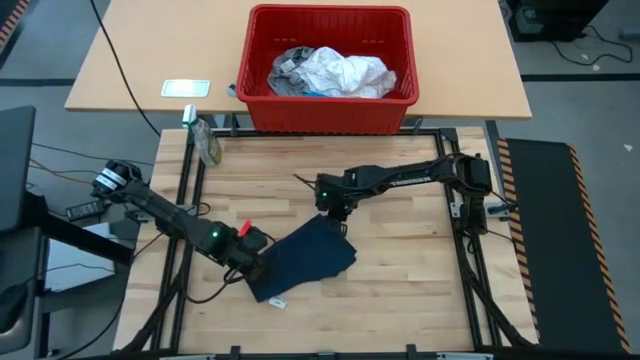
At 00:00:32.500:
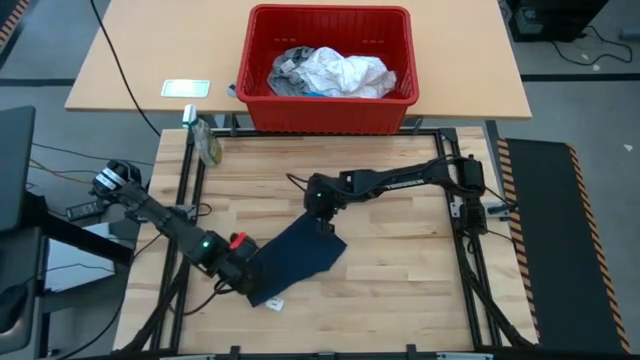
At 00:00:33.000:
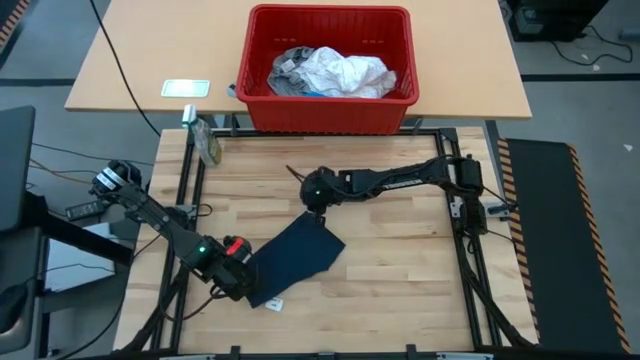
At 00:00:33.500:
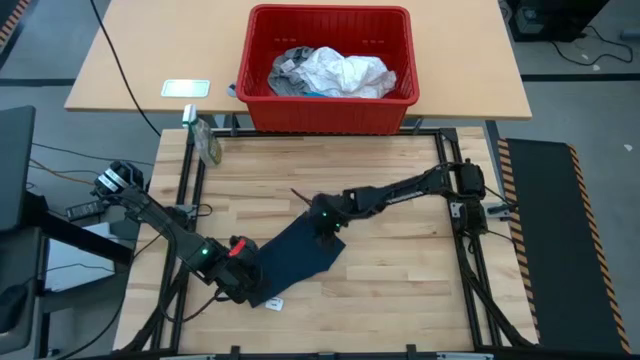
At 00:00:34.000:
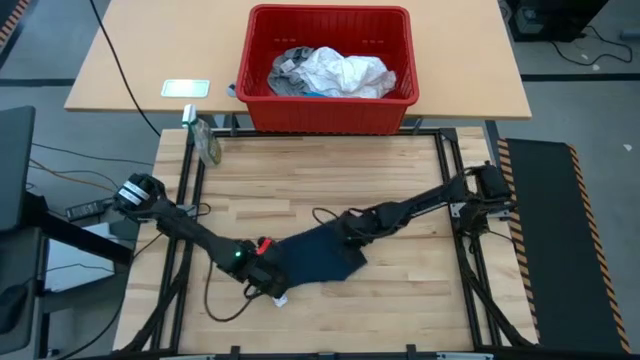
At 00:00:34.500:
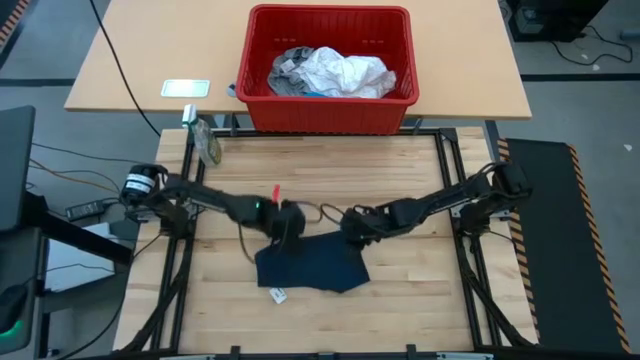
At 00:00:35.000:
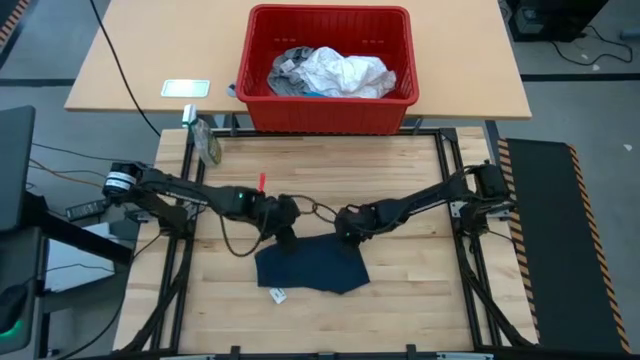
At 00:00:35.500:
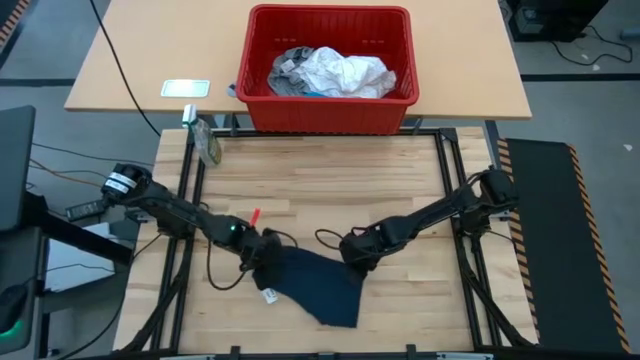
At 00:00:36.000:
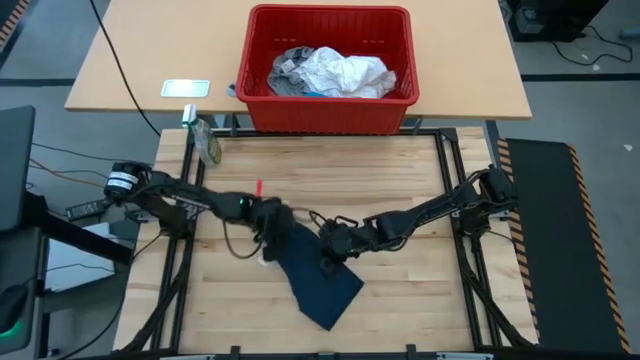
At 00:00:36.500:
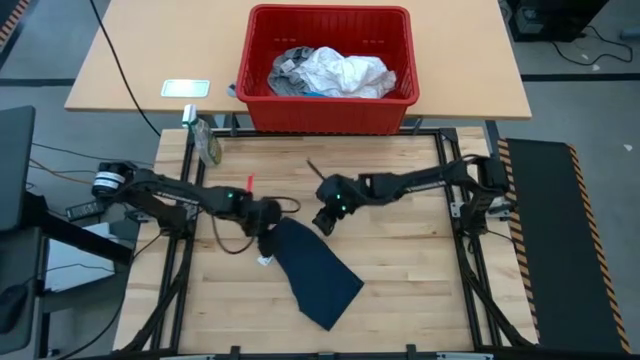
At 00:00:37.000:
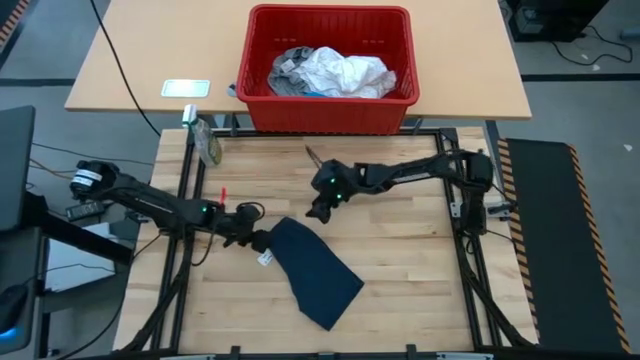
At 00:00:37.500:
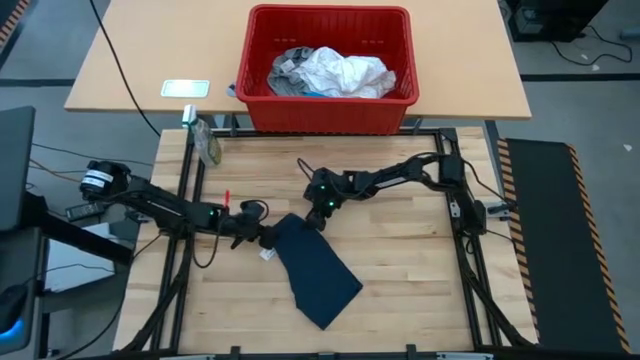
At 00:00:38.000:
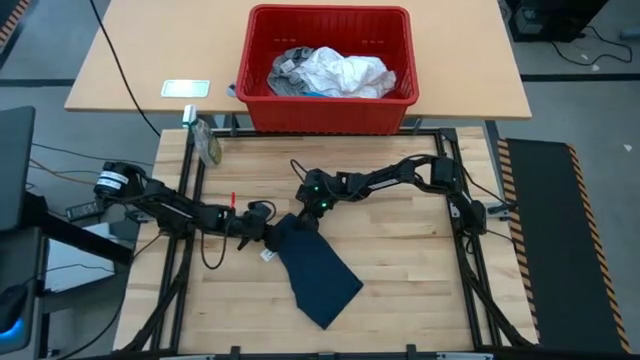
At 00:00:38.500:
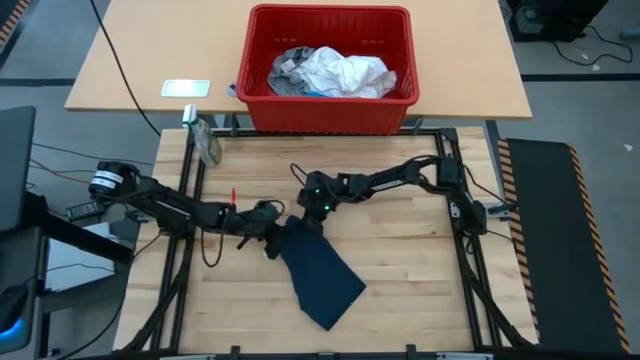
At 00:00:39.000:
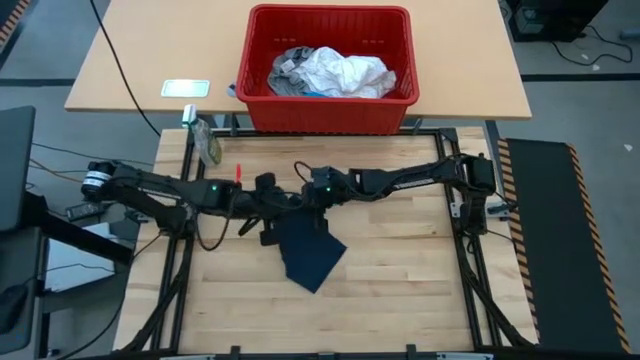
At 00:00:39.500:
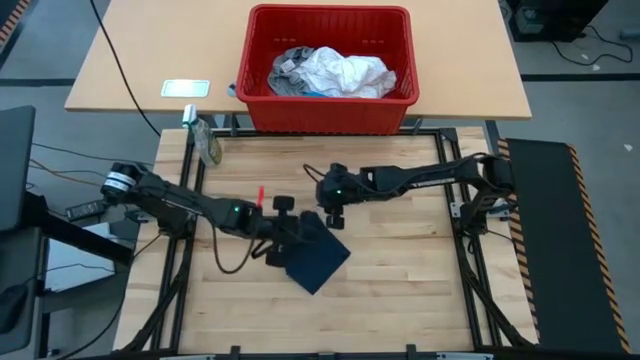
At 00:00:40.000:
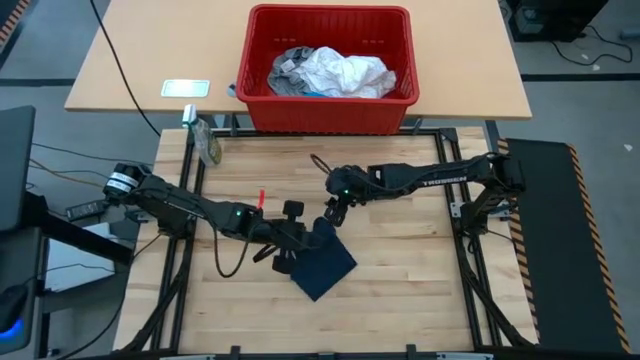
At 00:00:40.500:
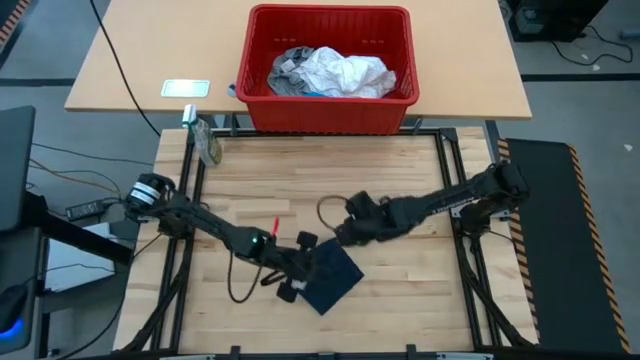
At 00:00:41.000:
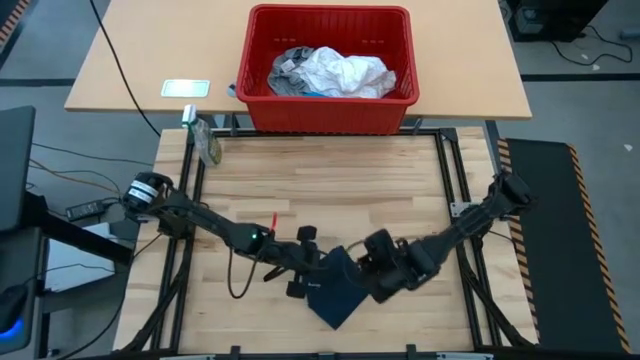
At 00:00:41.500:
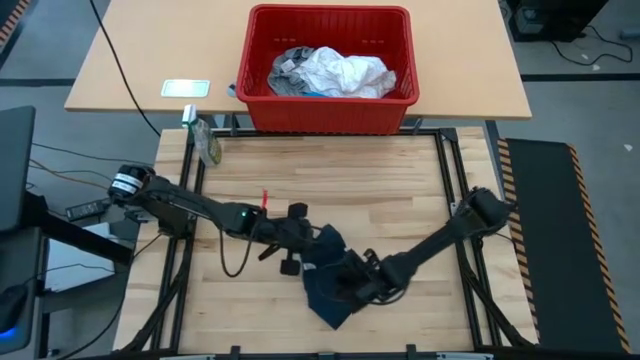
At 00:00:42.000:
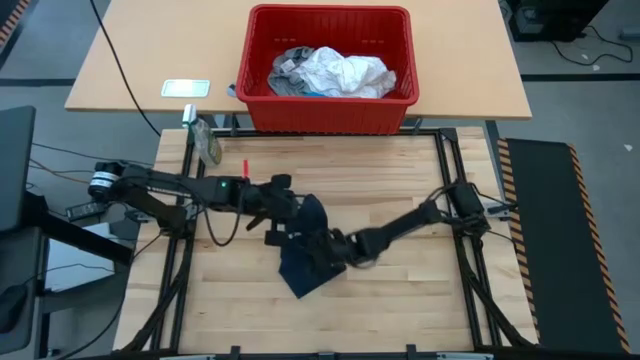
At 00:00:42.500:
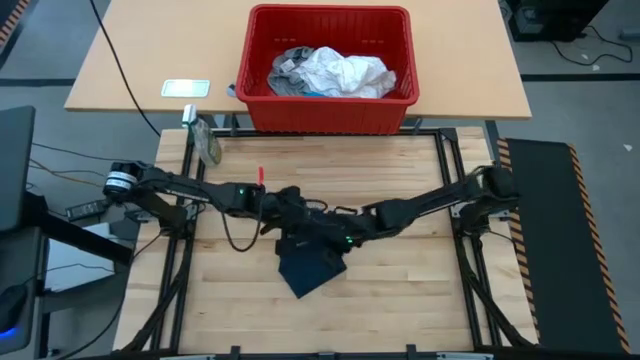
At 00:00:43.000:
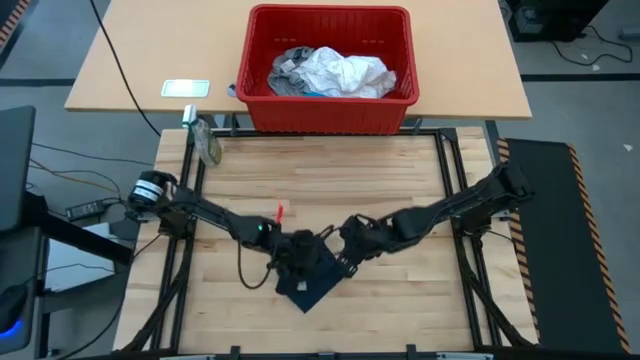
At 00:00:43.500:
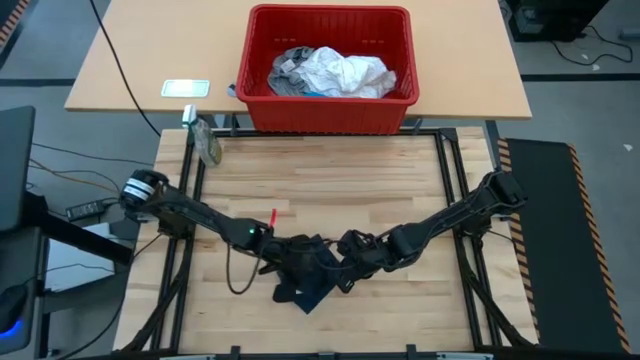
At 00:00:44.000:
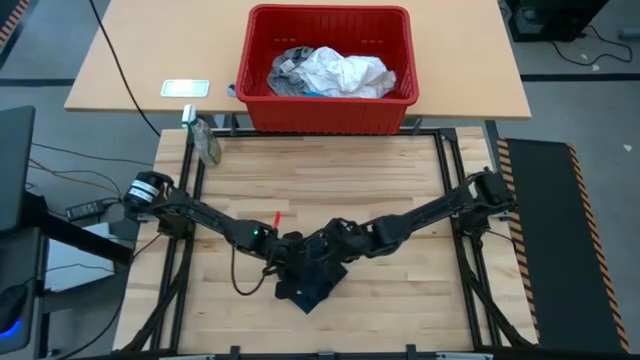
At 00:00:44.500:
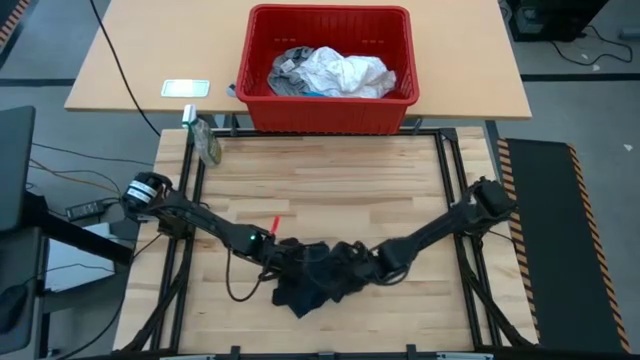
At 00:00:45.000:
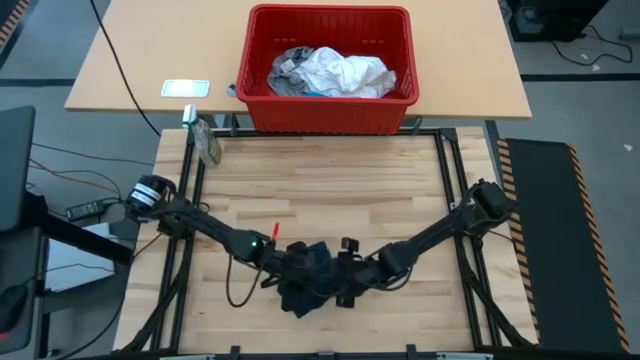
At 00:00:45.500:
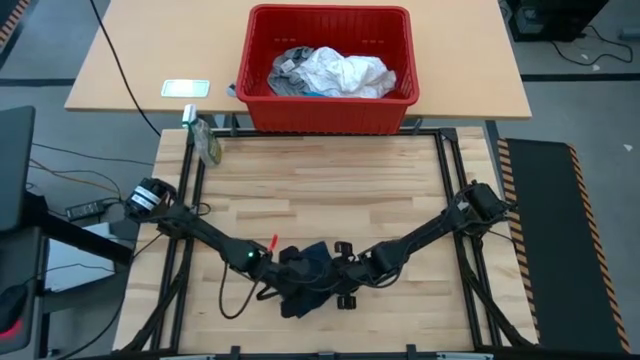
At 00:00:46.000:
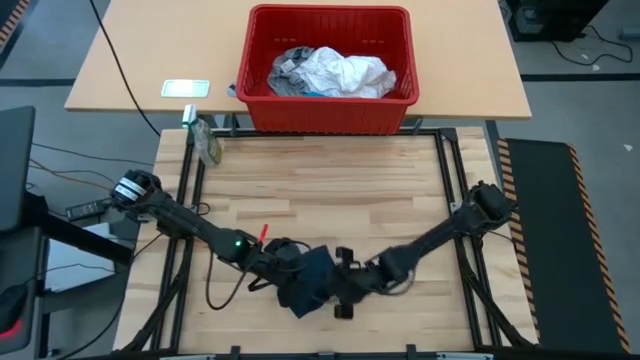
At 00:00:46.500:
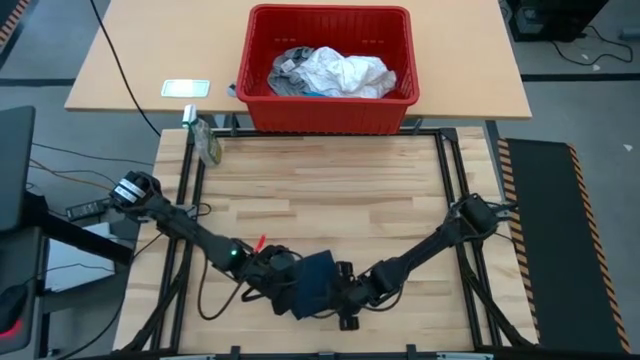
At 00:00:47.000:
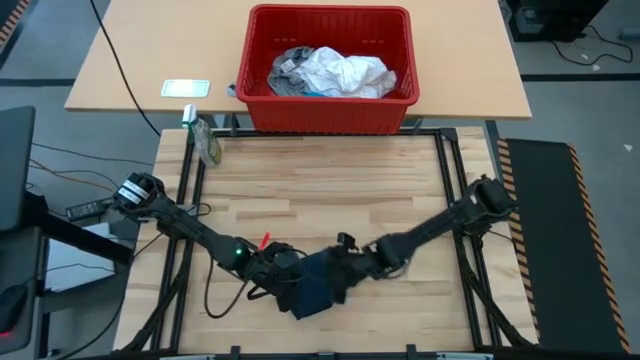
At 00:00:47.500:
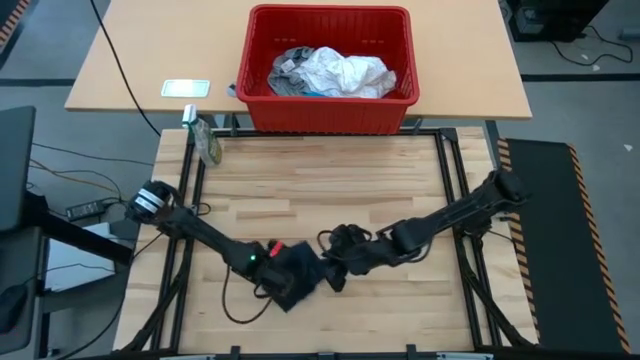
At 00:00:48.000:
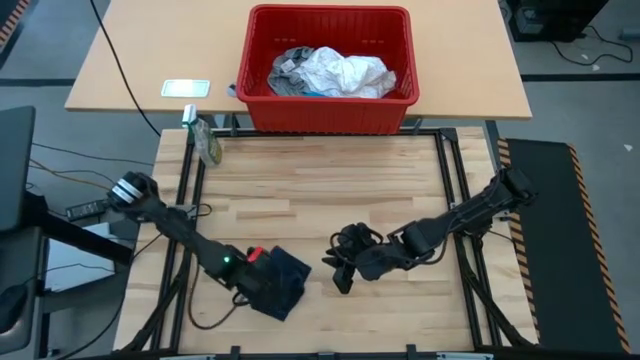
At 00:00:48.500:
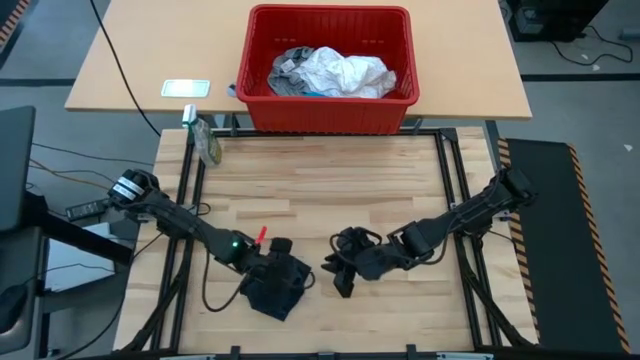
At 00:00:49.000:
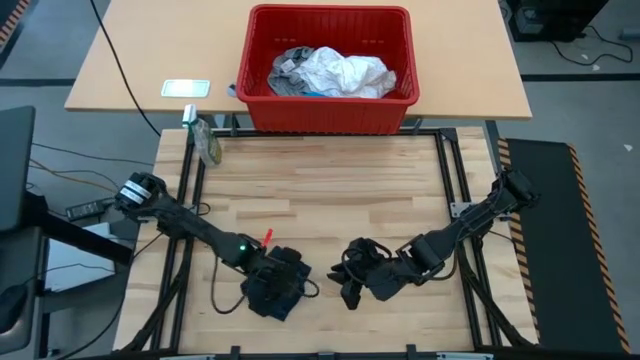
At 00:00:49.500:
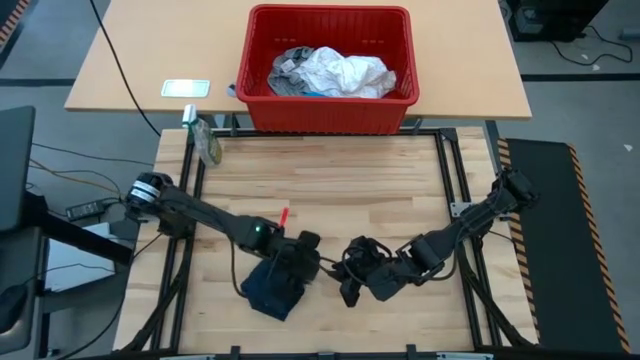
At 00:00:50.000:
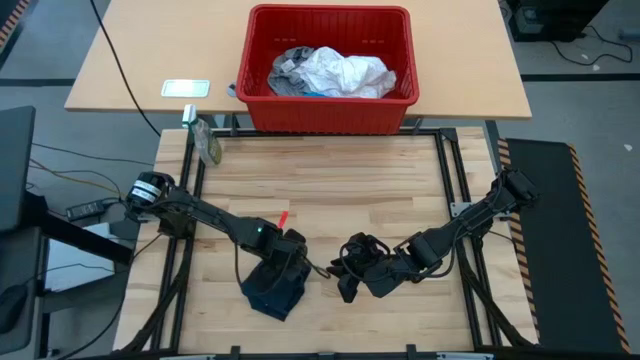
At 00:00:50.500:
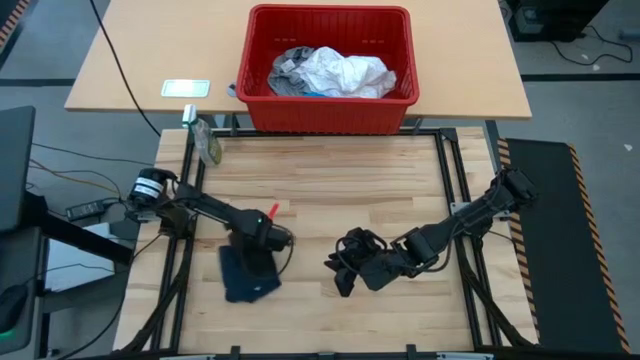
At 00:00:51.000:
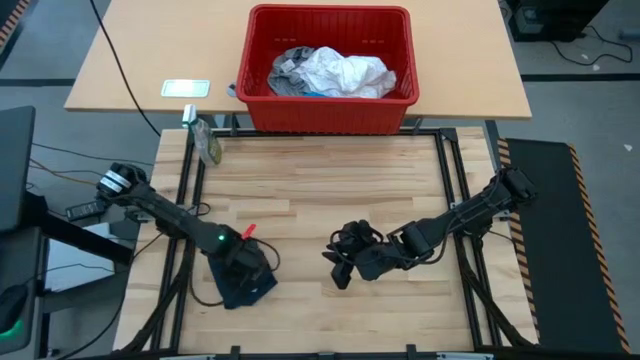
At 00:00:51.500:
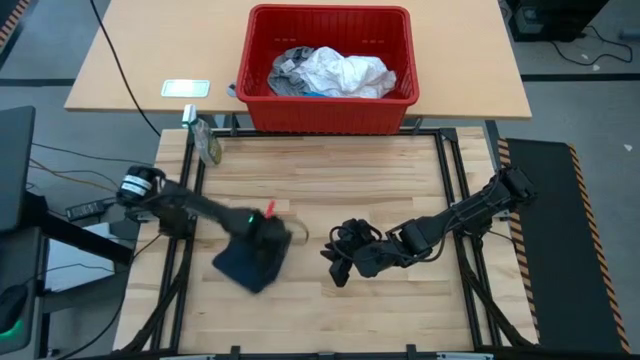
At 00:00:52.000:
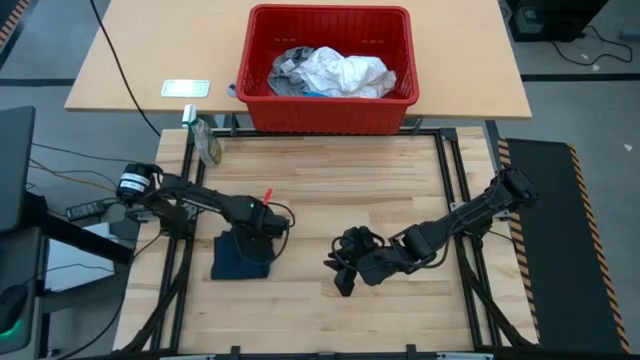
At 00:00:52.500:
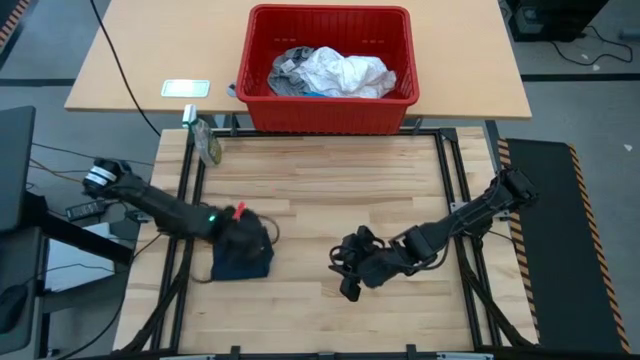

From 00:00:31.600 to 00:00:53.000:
Task: Fold laundry
Fold the blue shorts
